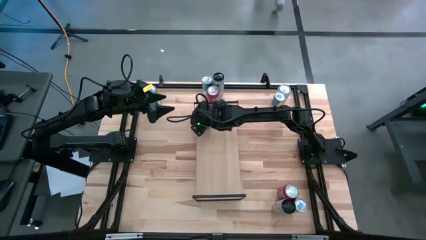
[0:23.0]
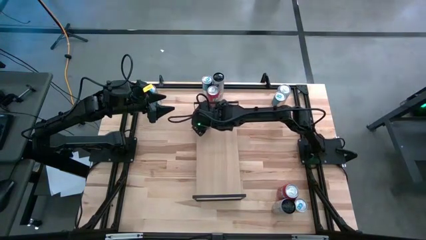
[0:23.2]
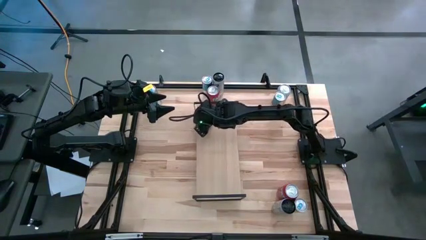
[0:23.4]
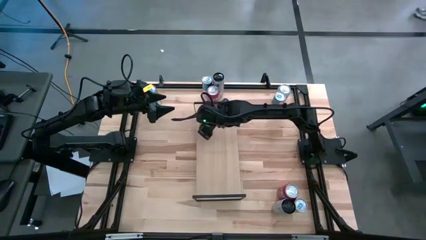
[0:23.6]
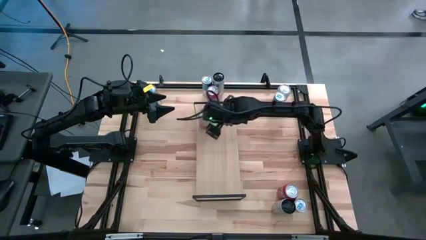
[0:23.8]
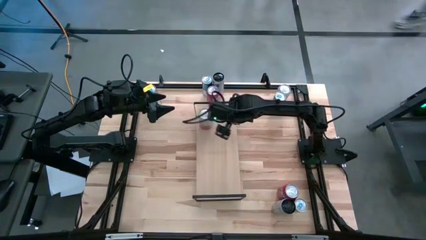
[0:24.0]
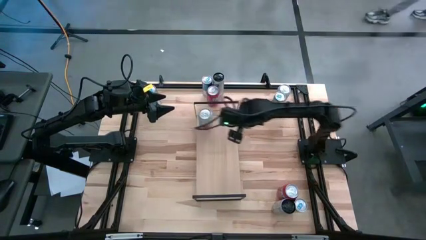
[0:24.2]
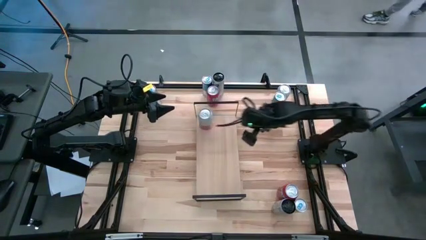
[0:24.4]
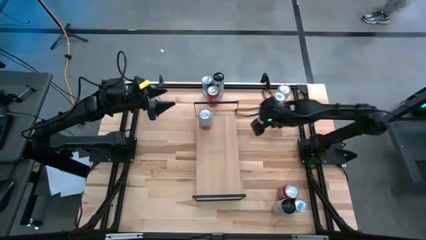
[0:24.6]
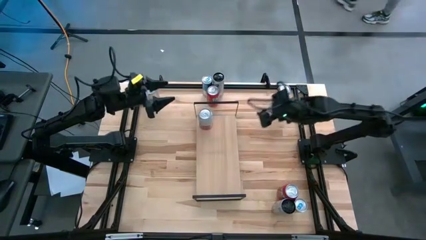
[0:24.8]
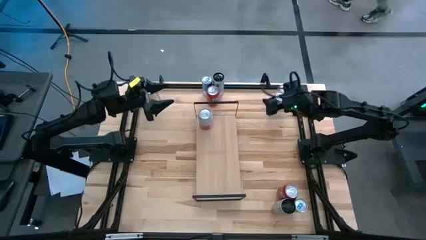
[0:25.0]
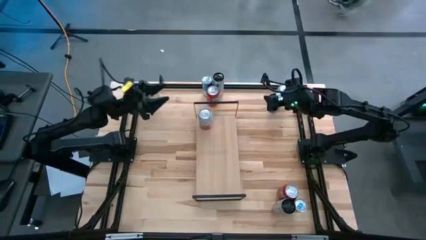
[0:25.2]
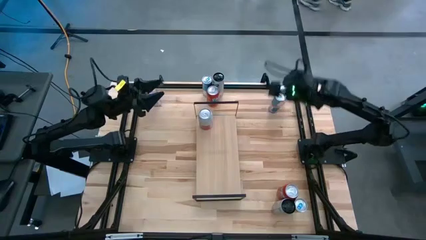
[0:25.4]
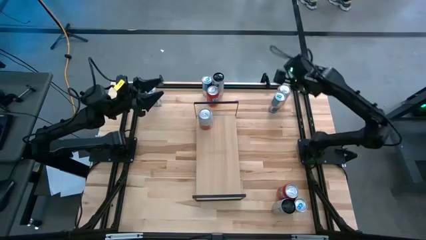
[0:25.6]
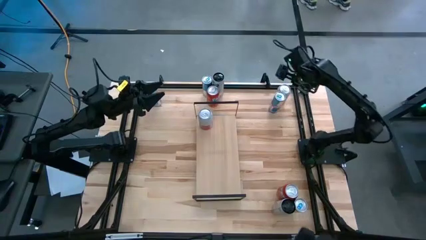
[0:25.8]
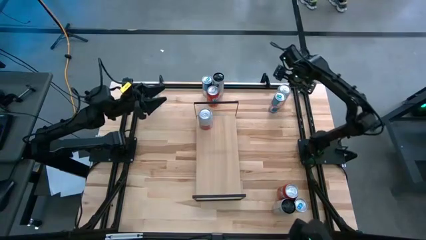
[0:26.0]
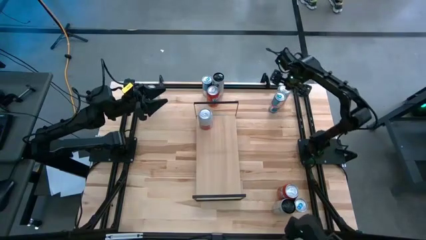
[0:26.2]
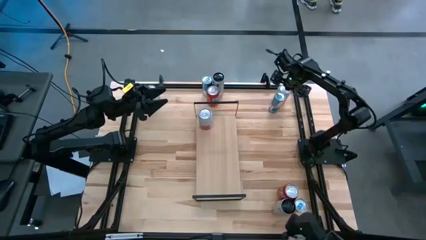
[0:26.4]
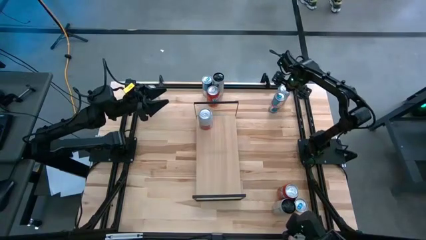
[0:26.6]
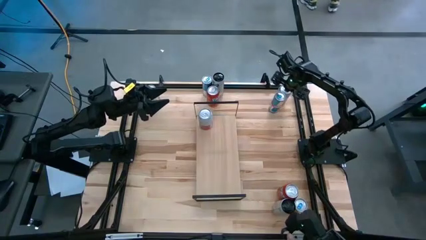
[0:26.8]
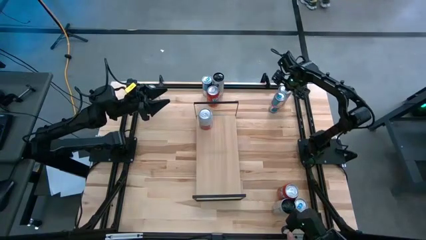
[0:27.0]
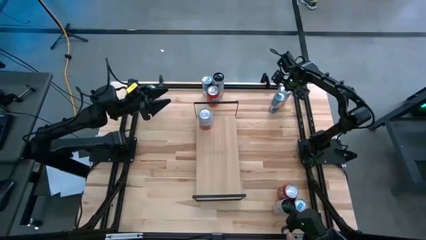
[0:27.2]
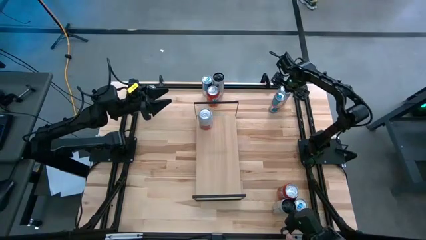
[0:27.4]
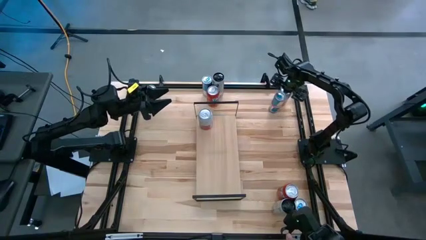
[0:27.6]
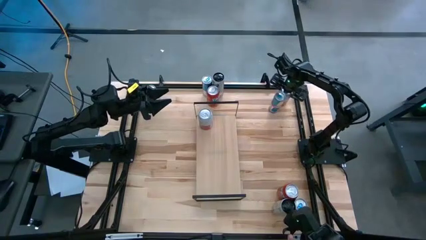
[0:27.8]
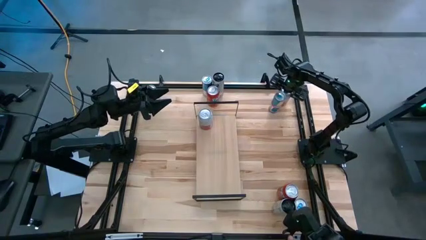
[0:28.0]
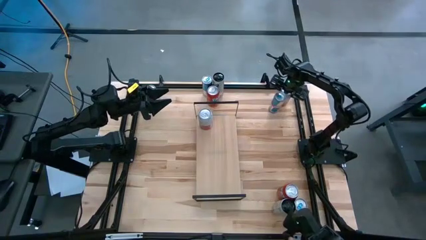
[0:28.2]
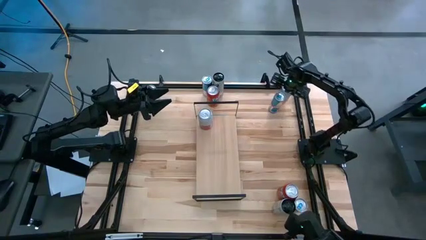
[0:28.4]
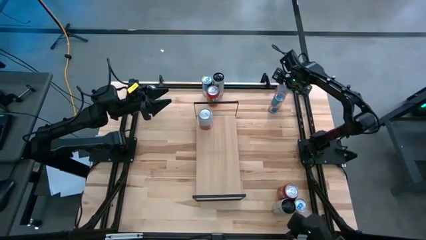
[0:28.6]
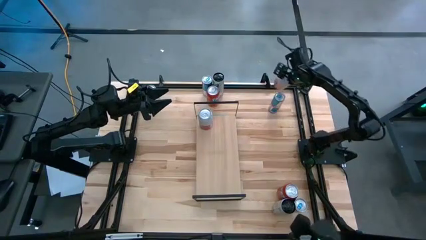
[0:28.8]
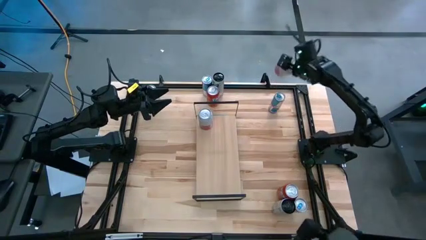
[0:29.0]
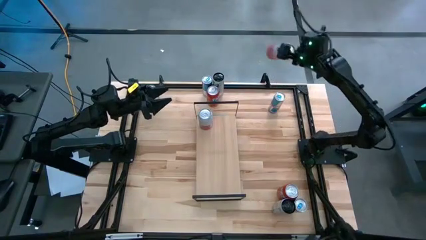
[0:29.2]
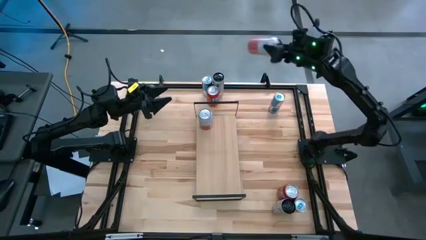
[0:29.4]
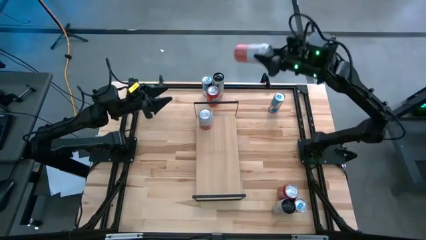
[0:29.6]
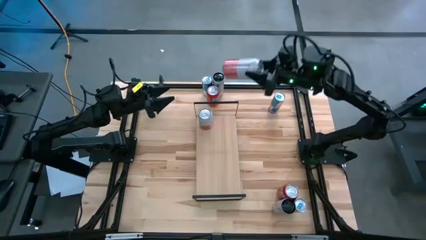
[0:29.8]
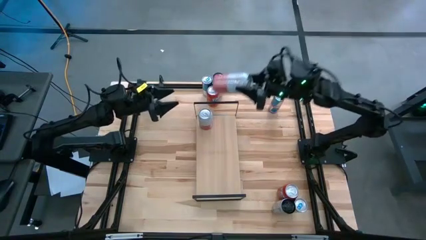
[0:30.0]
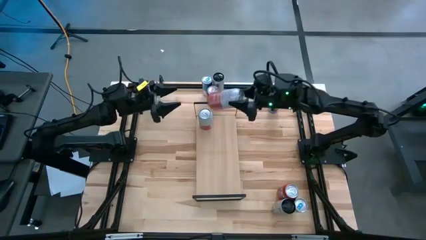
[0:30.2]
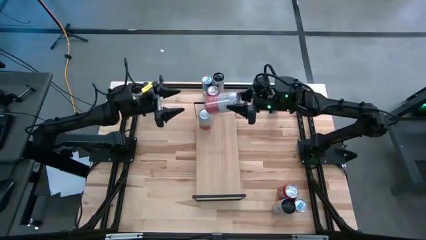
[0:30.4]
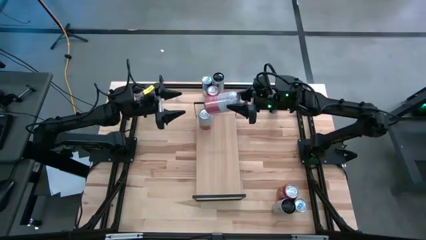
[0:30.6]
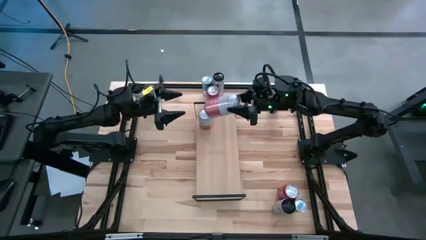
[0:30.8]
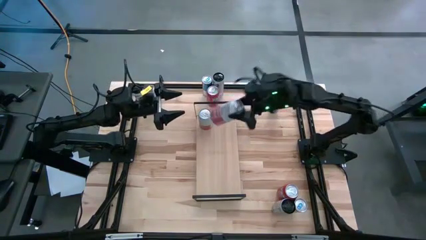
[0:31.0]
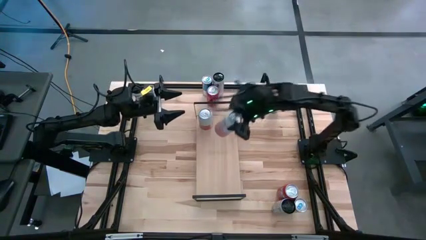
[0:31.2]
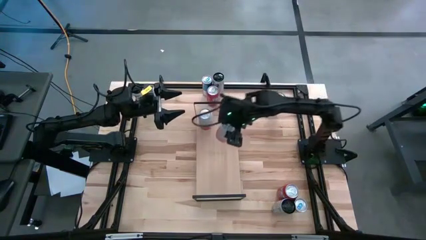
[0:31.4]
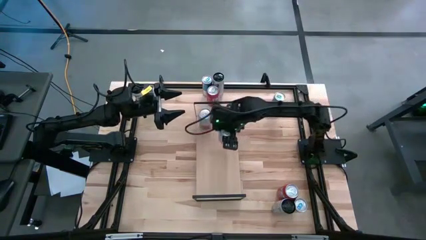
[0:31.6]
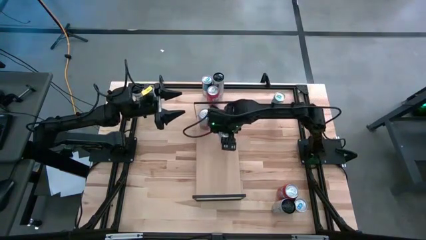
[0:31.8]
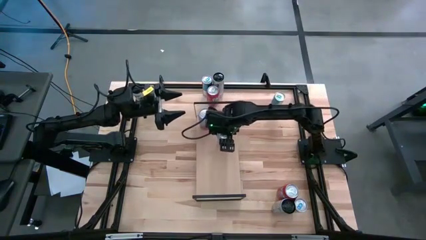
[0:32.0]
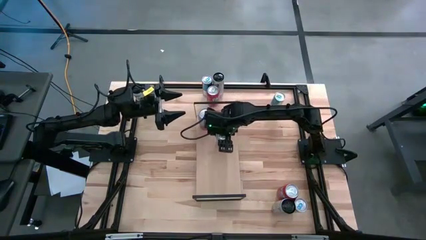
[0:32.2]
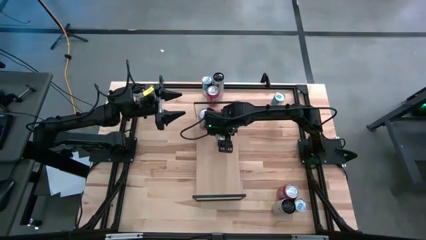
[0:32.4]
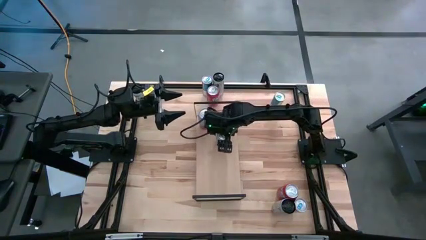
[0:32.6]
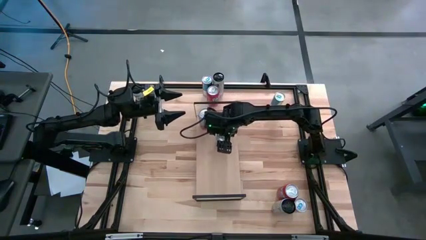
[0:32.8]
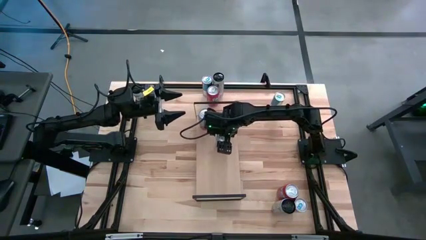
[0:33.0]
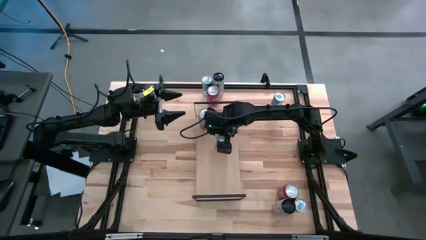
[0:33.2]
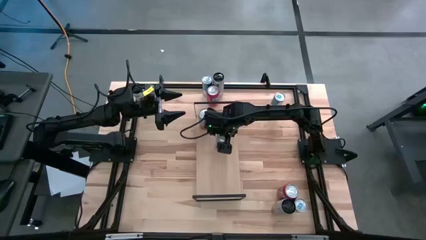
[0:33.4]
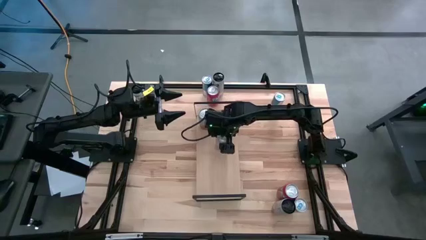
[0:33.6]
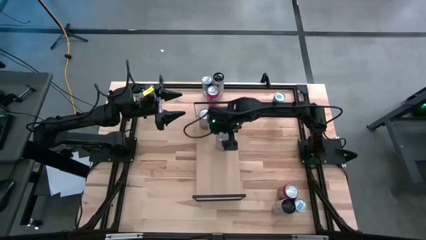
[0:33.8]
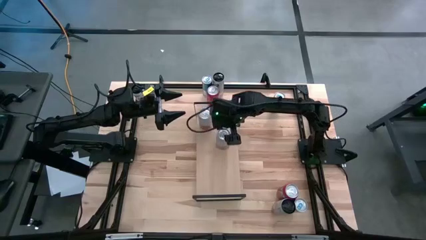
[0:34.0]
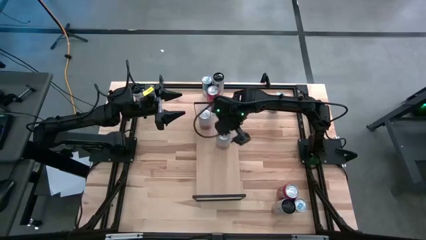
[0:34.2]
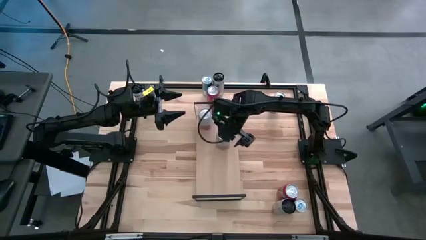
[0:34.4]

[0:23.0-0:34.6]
Task: Place canned beverage on shelf
Put the pink white soda can on the shelf aligned with the other pink white soda can
